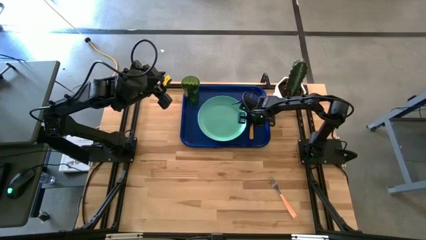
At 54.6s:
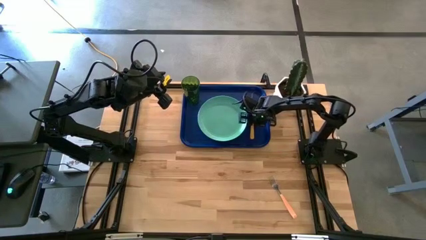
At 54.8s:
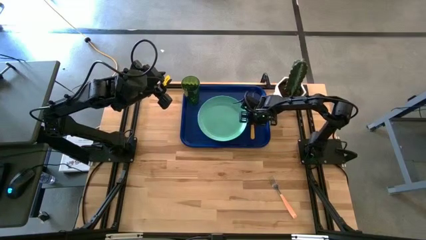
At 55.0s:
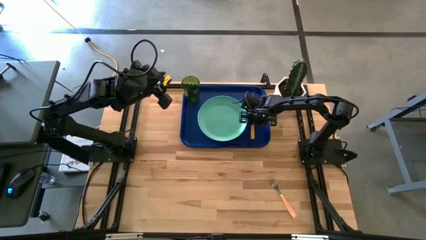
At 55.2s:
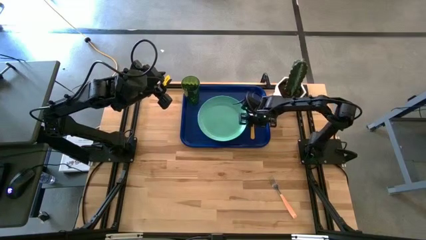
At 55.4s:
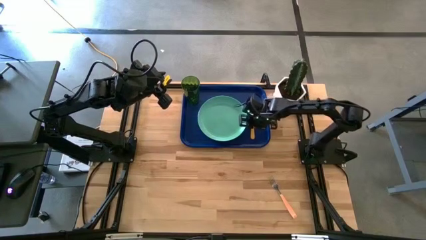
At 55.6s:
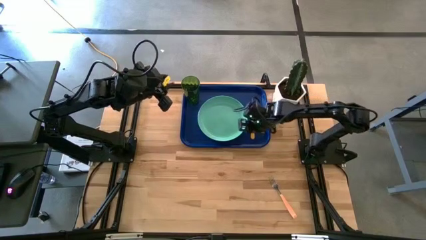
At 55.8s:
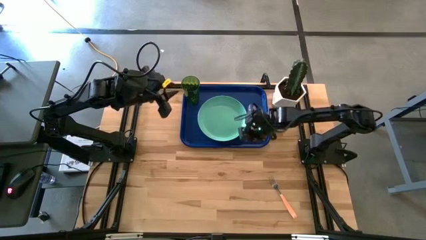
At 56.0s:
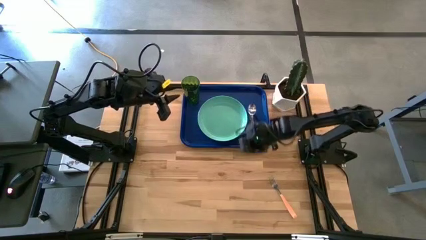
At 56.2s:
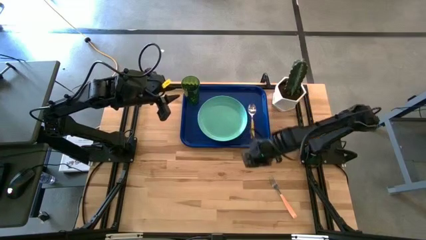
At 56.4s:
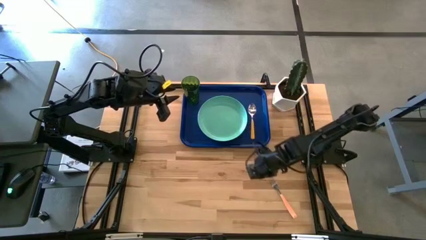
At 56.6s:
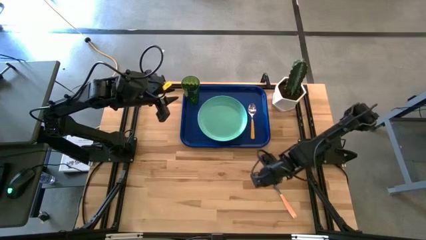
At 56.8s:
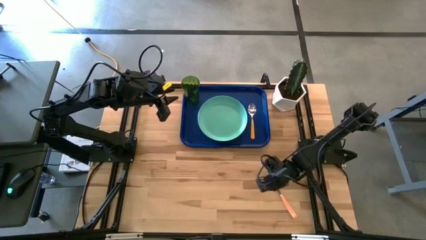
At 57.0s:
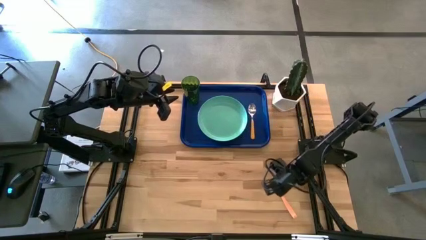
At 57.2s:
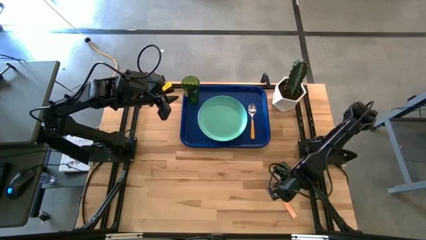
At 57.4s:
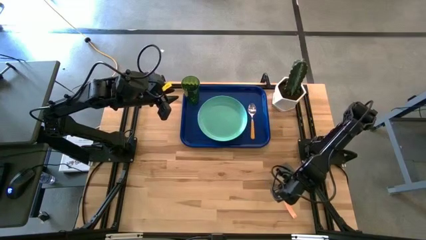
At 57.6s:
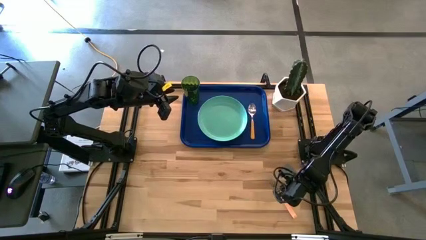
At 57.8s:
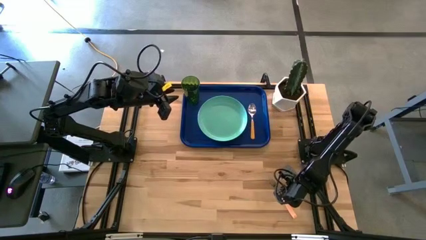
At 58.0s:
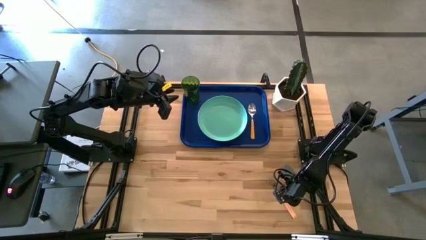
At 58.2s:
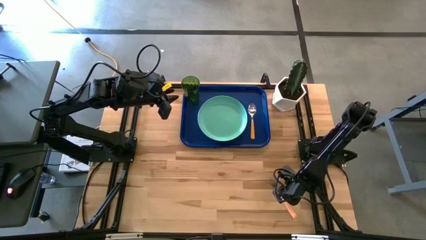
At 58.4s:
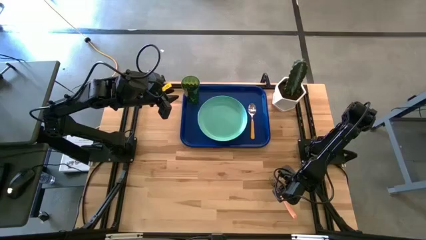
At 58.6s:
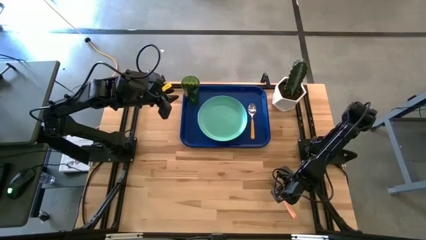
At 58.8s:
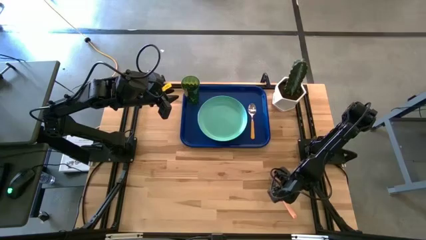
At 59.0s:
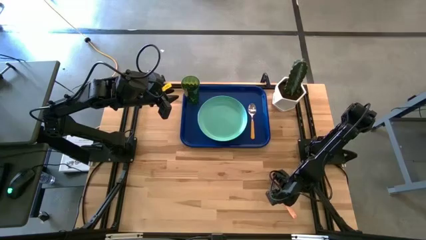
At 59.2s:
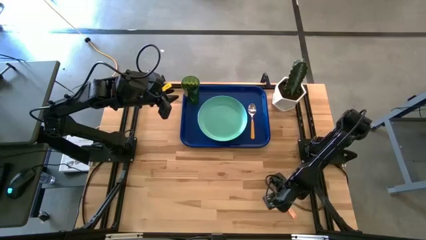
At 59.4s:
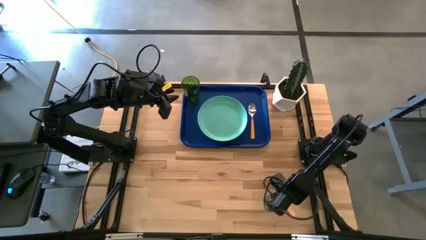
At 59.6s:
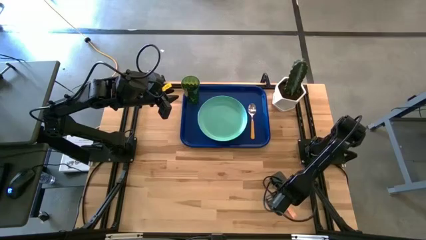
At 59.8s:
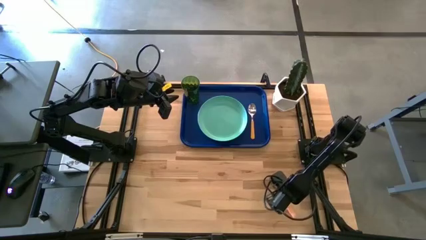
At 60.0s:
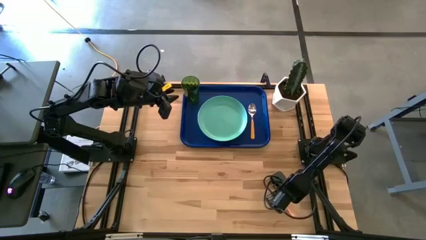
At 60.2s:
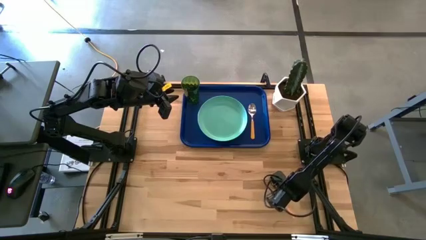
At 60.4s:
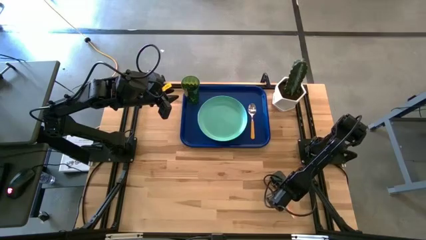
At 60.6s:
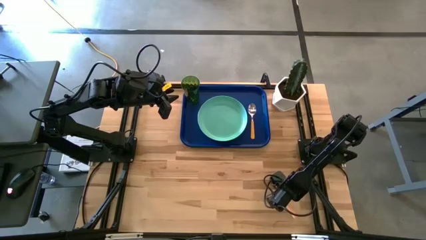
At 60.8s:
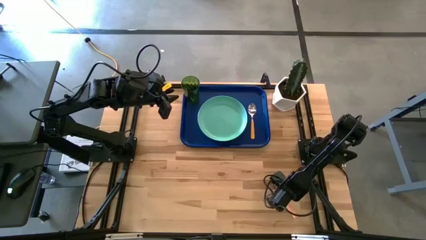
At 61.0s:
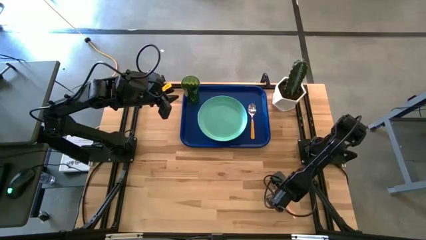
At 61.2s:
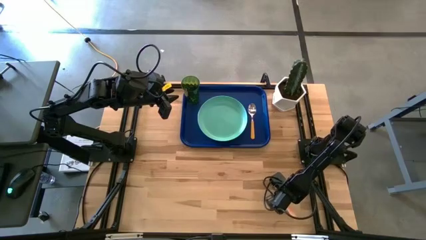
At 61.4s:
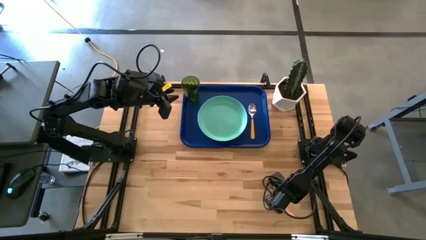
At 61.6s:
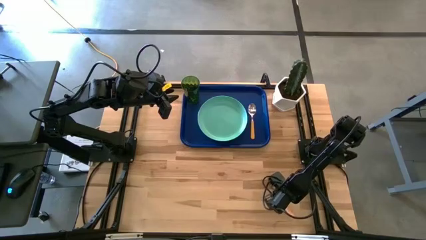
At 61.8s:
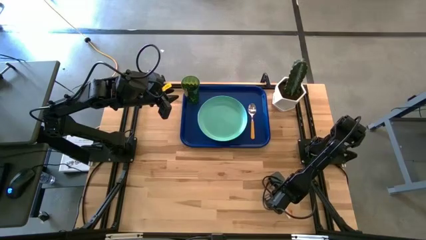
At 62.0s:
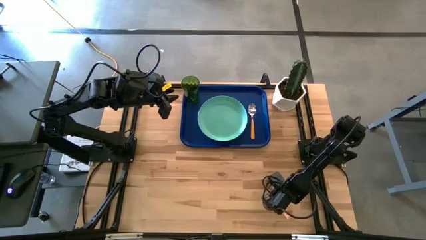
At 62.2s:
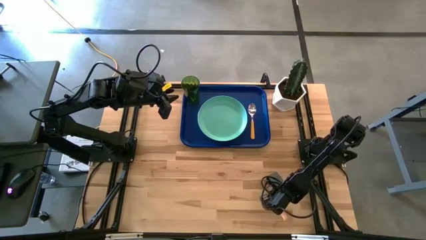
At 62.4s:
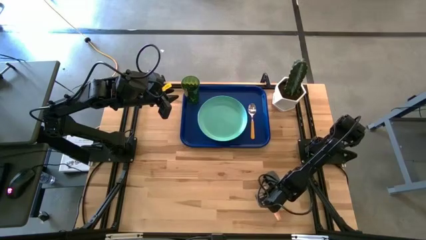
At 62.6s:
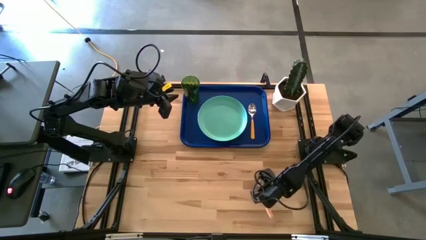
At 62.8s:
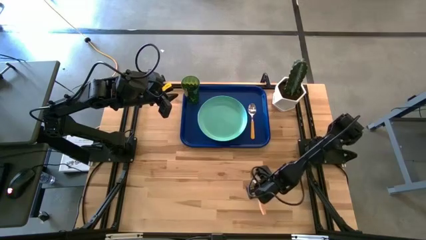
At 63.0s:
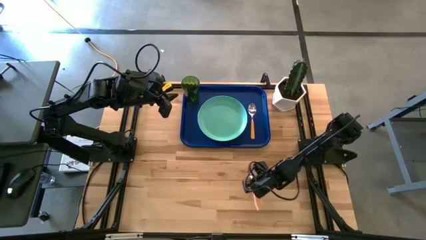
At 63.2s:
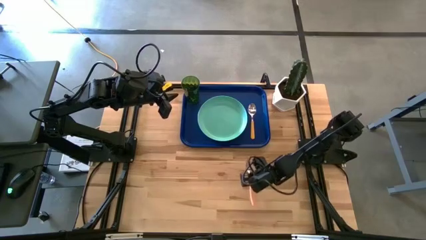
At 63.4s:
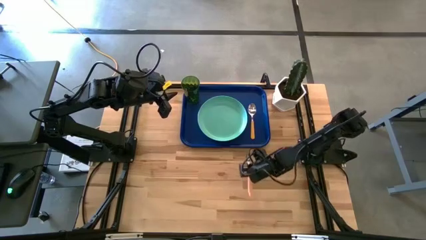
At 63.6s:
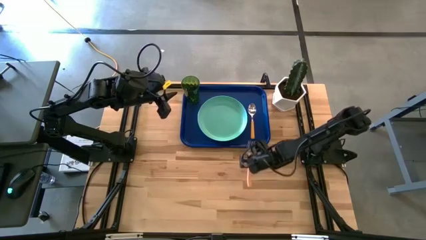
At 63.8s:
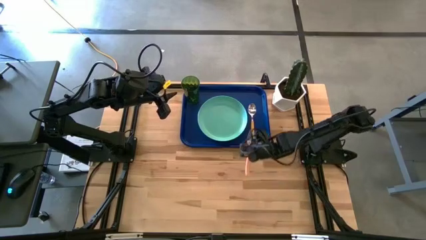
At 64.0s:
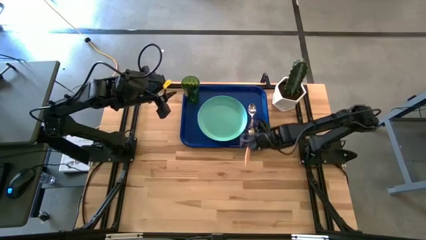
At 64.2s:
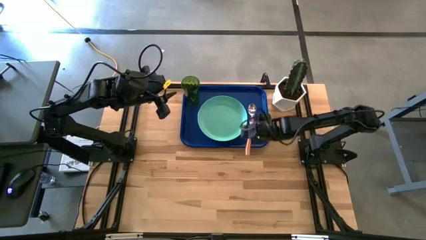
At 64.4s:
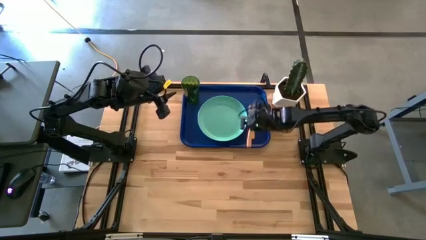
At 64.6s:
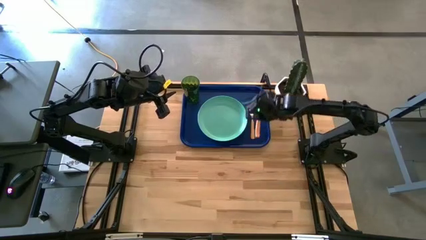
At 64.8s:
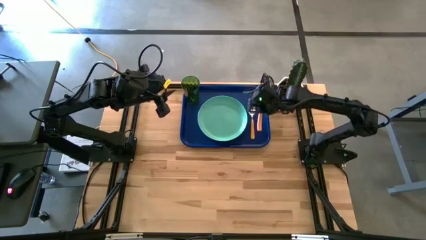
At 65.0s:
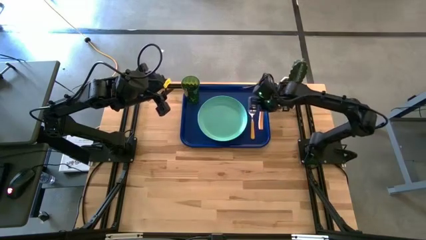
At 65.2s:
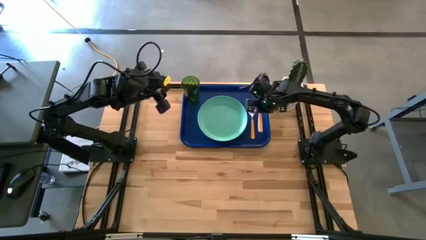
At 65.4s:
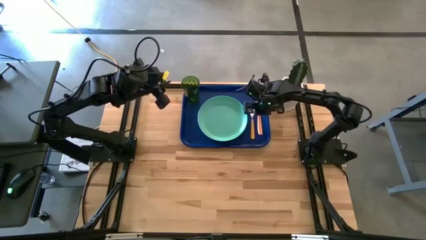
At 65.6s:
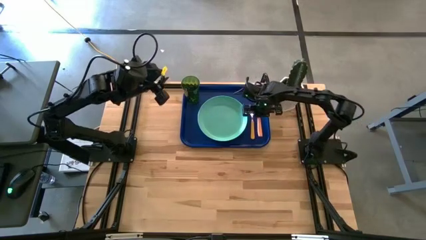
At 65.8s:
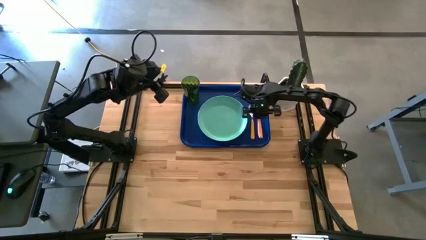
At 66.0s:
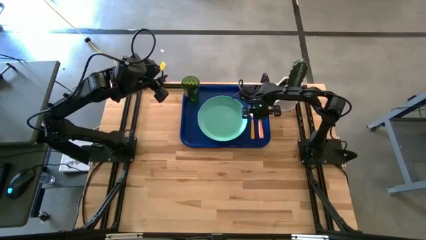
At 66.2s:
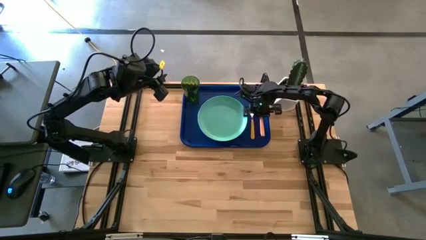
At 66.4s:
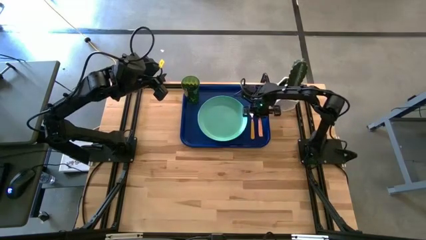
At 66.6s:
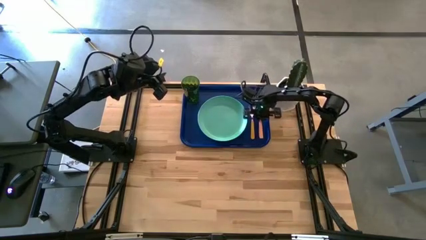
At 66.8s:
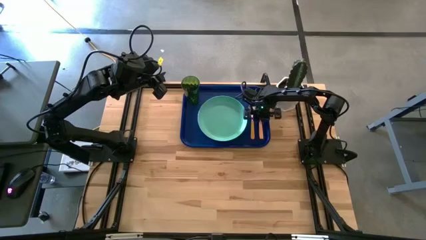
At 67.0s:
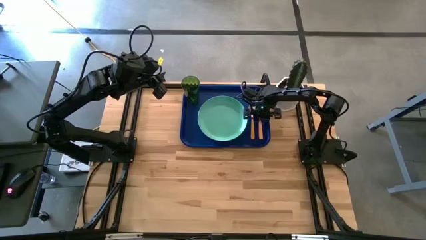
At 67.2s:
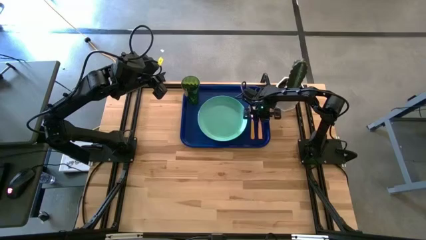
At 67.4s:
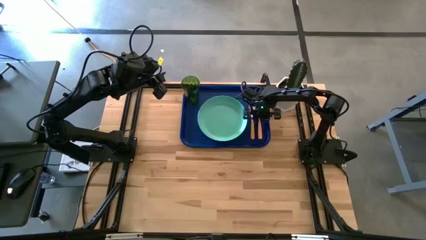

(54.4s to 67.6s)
Task: Pick and place plate/cup/fork/spoon on tray
Put the light orange on the blue serving tray
